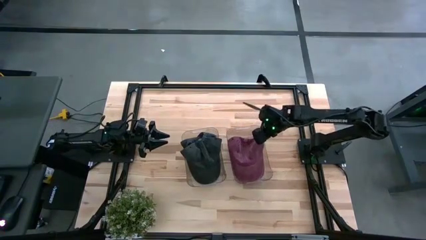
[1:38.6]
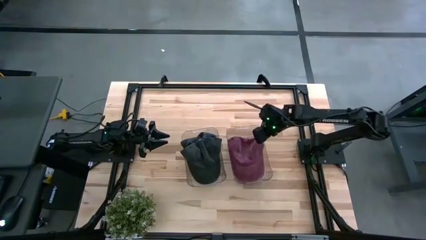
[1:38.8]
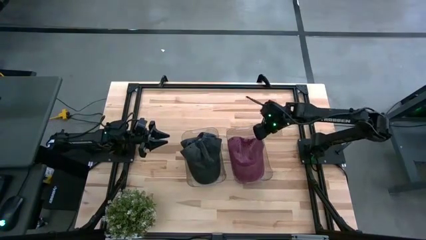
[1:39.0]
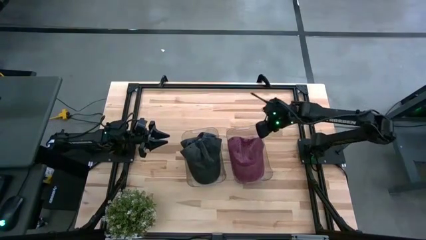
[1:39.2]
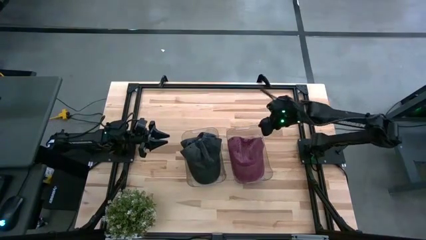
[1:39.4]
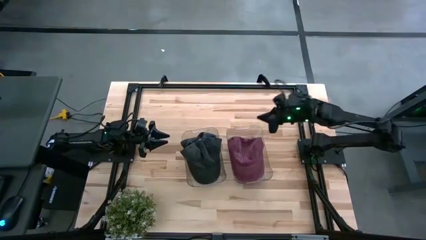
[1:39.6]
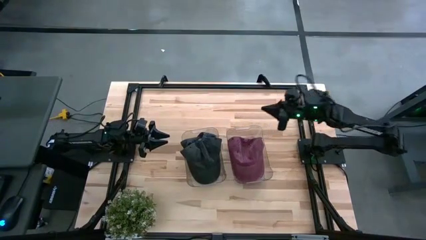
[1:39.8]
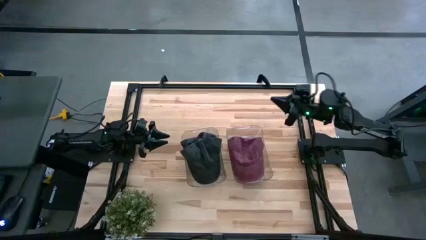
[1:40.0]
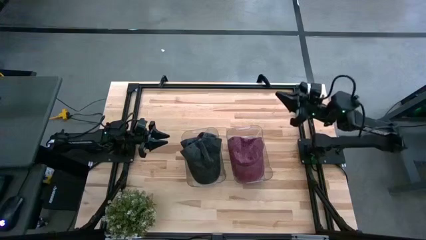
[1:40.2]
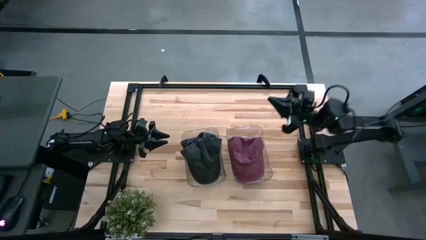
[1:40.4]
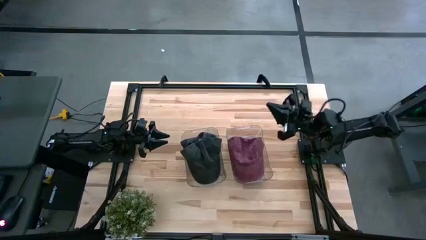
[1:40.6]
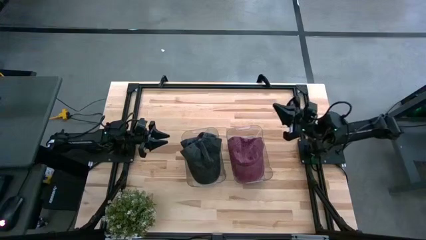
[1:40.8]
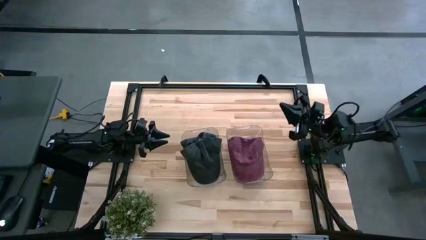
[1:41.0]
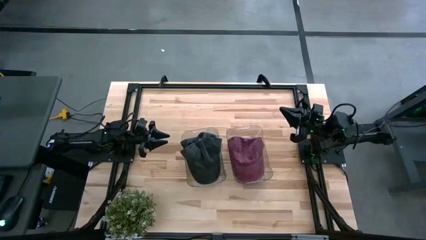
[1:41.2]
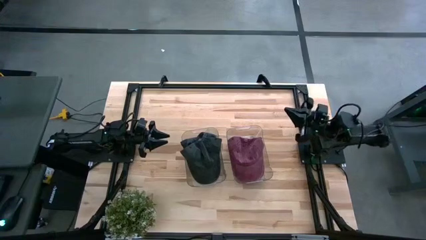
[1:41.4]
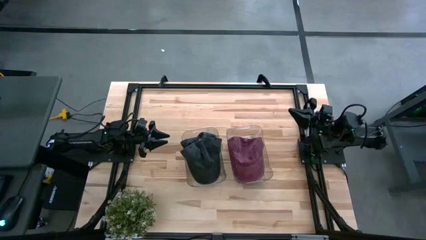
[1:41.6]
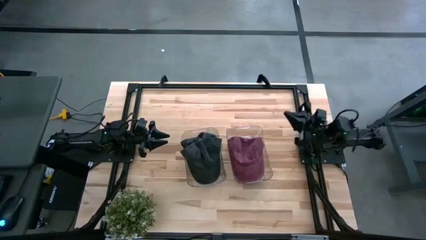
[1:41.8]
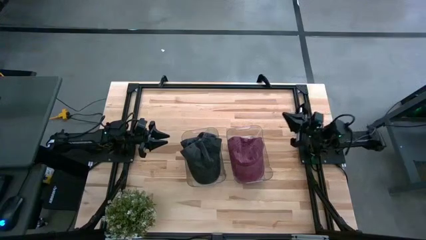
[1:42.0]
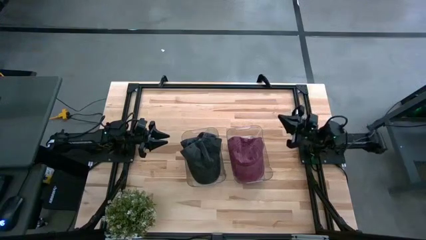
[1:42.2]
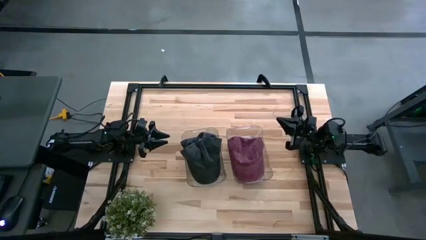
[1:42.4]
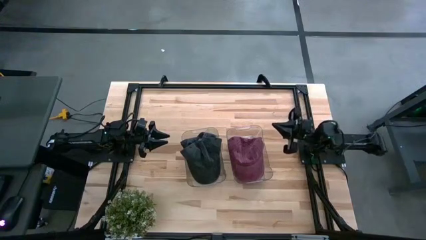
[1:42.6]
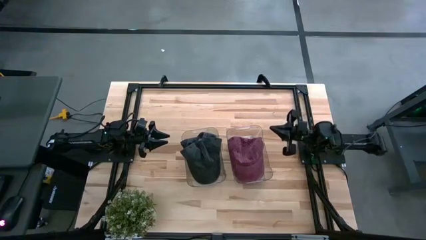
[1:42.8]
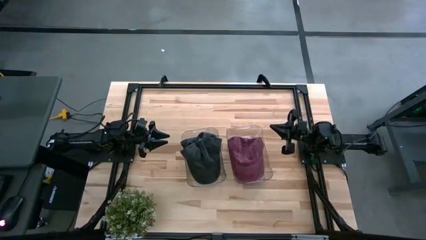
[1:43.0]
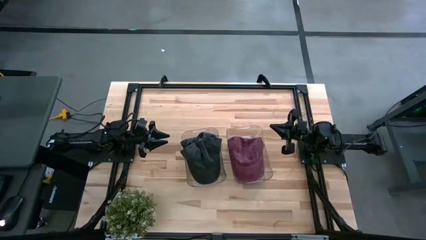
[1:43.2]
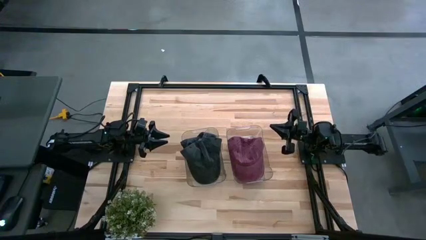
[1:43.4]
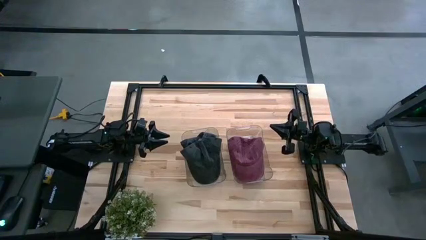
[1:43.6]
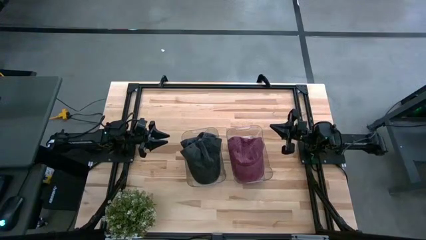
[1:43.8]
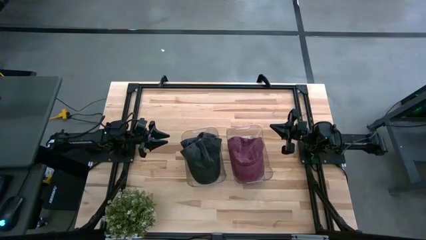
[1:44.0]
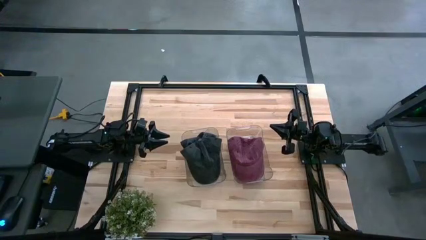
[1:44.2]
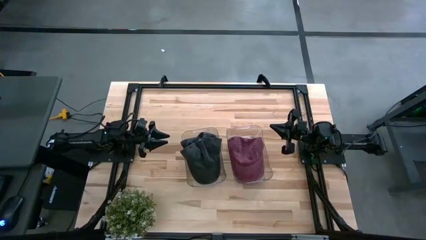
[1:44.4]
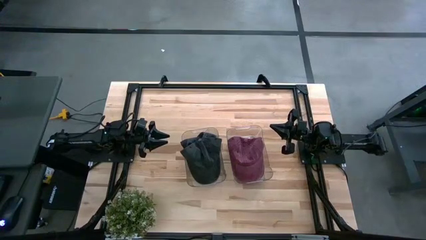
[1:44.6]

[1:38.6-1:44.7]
Task: Pick & Place hat
Return to Home Position

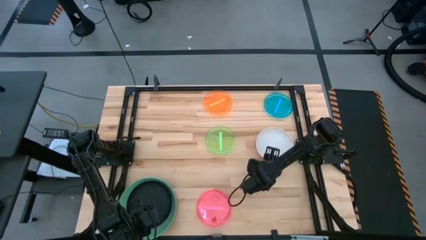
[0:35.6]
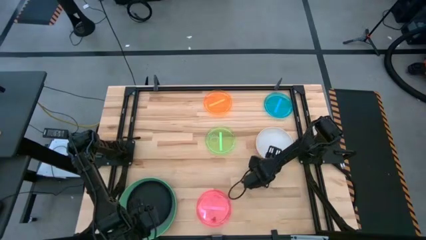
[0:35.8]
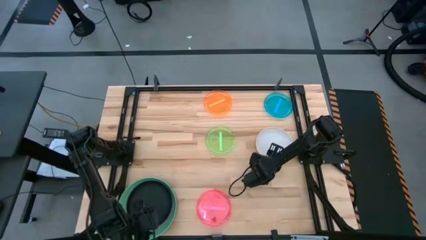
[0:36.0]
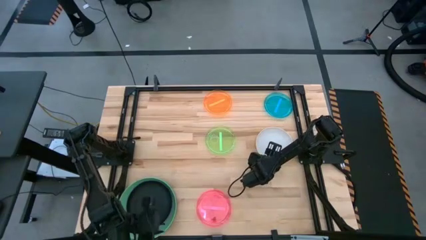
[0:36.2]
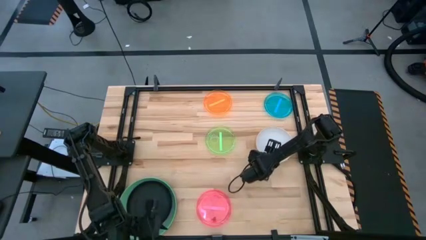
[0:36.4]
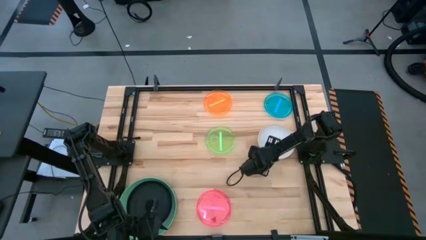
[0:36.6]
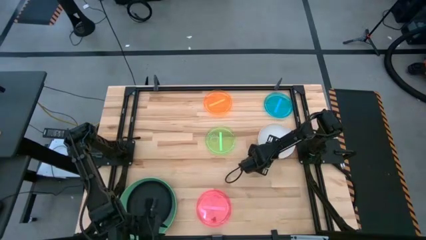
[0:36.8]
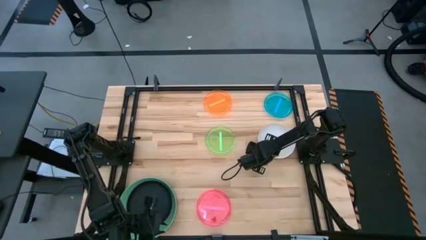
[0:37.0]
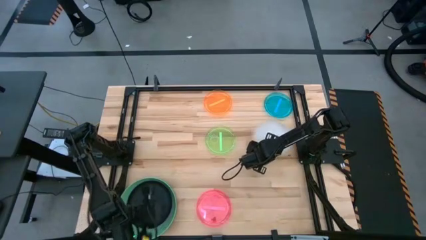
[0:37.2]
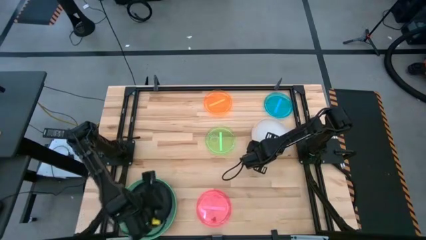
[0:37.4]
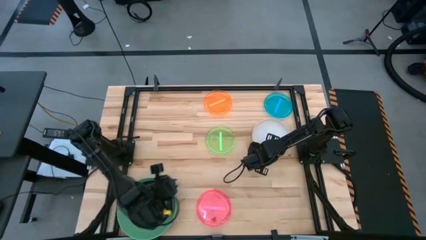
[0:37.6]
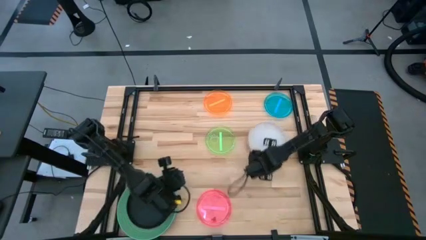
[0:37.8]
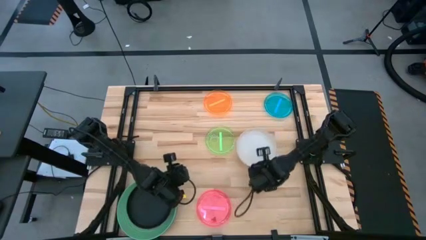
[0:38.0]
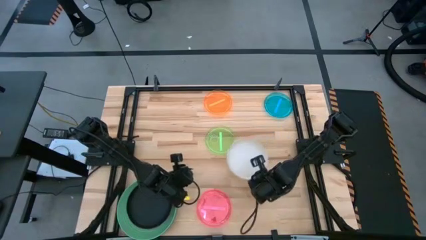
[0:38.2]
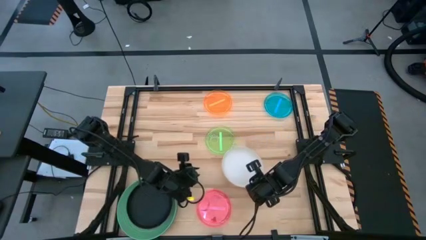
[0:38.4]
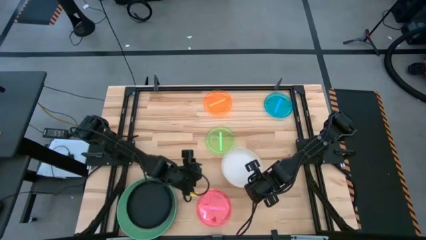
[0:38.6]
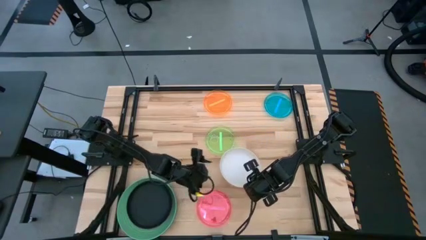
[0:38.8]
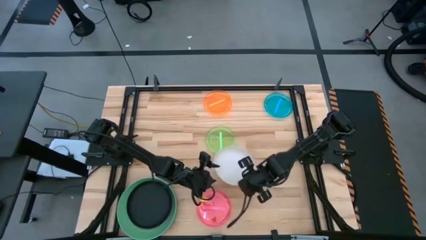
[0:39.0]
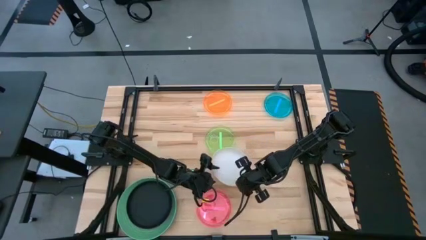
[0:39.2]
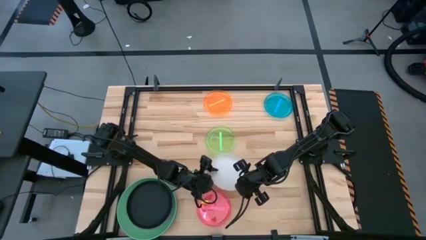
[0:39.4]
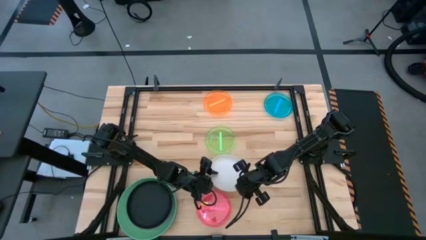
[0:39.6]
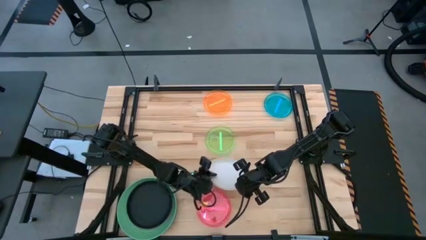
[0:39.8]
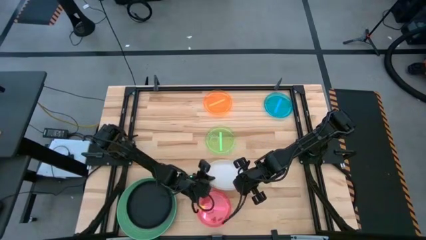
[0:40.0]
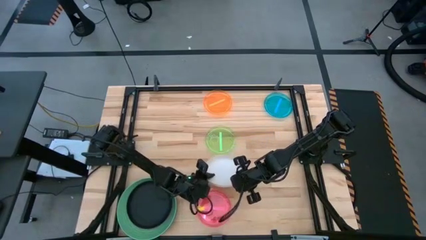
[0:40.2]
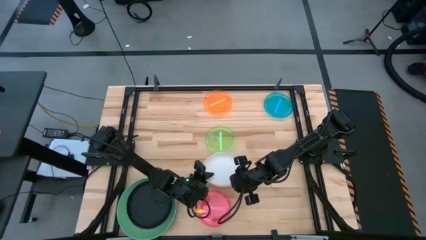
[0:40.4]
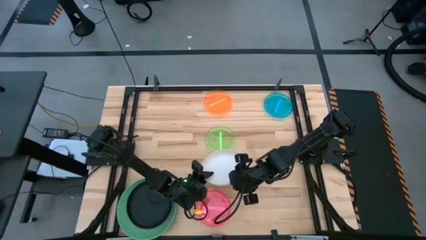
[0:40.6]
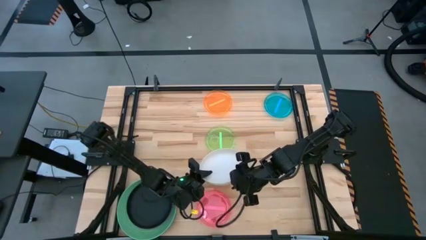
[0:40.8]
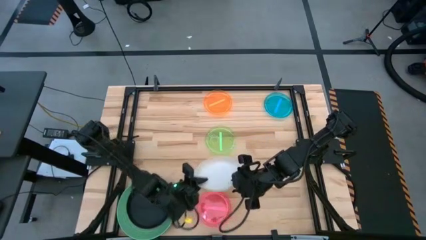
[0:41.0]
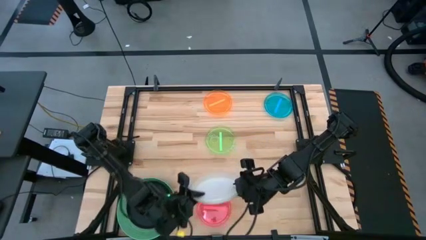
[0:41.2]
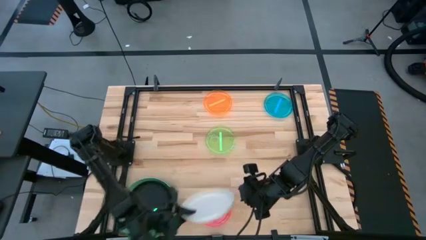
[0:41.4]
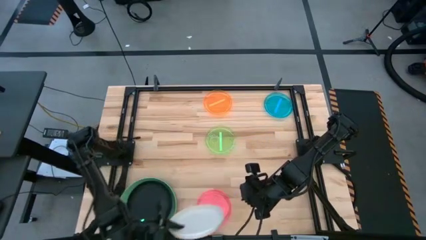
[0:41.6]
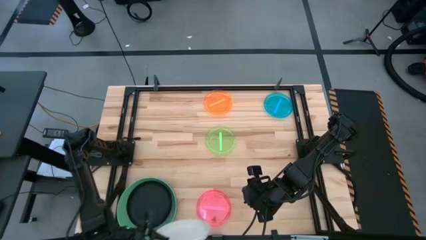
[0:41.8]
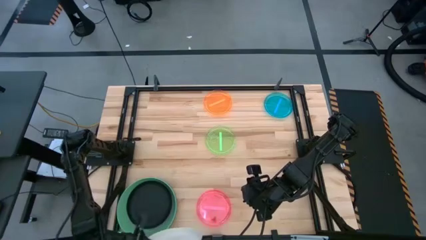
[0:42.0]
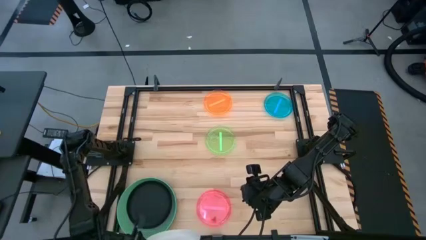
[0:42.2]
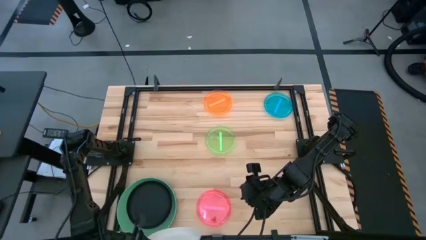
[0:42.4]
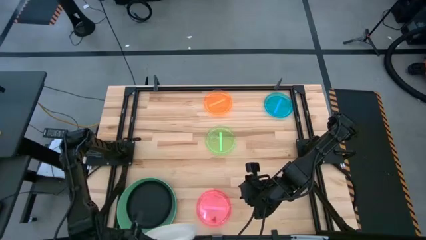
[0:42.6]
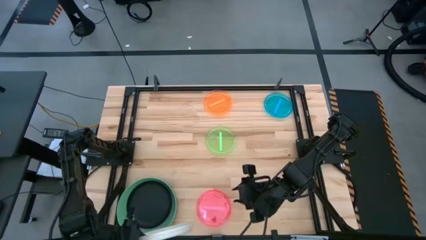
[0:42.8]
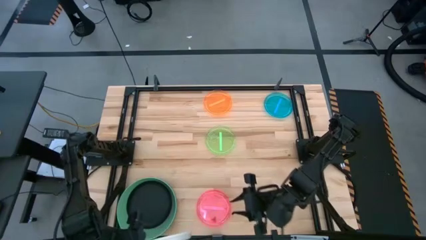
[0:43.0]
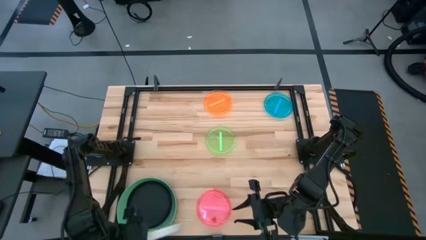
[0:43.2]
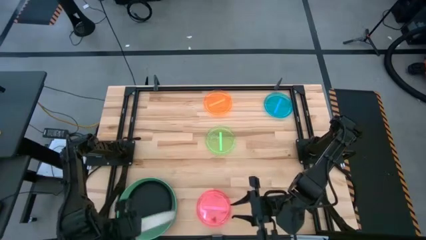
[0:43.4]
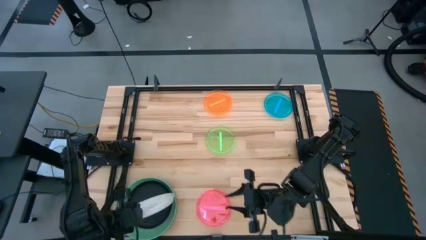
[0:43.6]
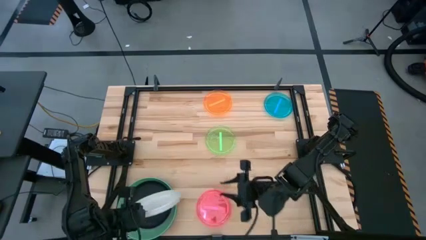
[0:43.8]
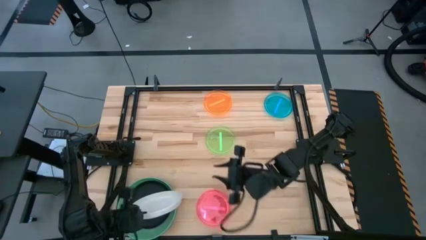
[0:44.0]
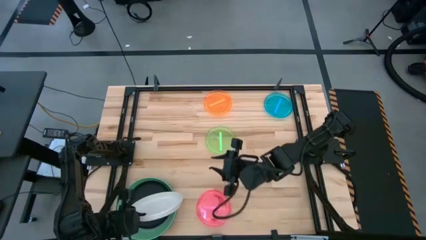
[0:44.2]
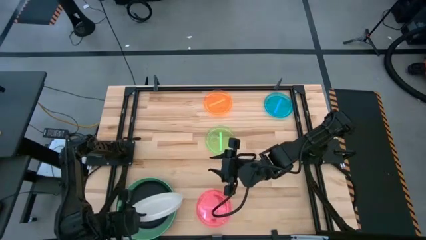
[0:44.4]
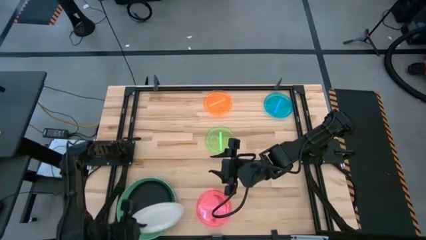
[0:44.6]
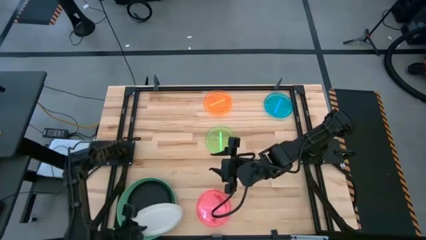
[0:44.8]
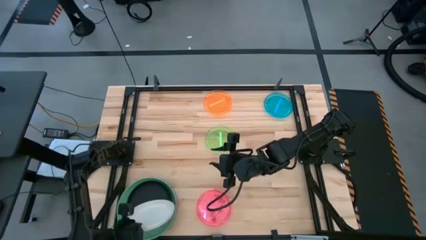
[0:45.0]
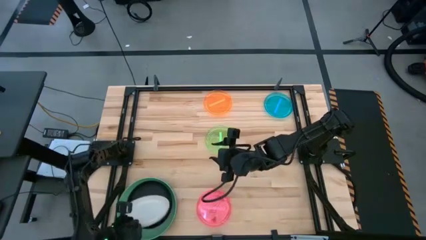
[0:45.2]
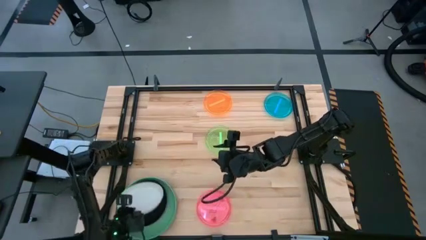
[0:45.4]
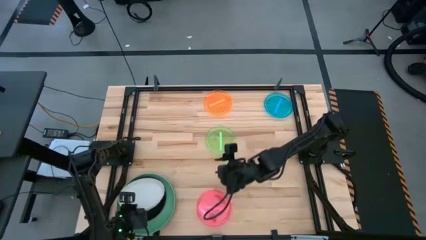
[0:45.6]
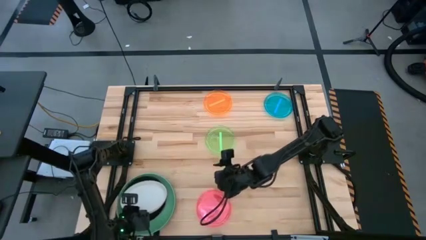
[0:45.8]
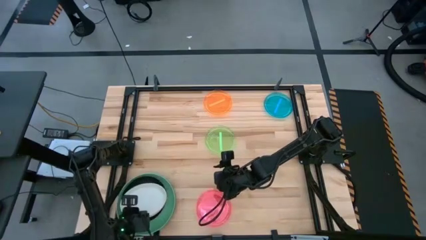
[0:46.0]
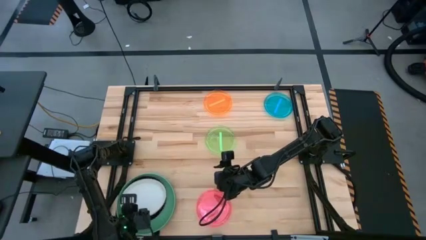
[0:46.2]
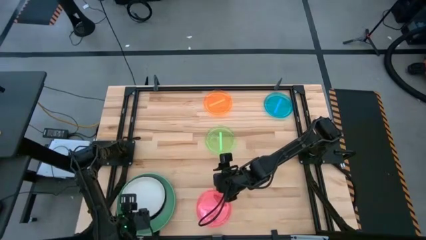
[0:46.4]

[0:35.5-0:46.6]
Task: Stack plastic plates
Stack the white plate on top of the black plate
